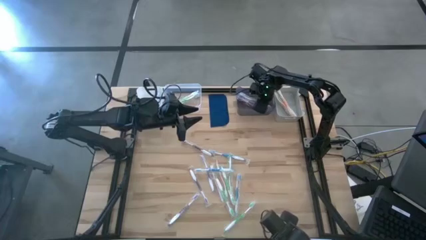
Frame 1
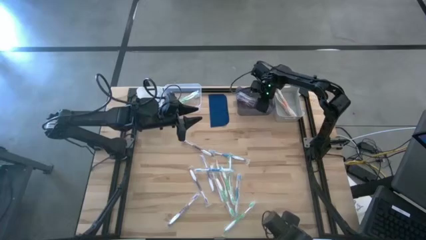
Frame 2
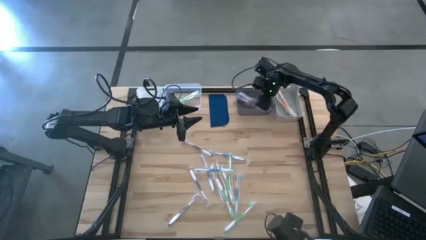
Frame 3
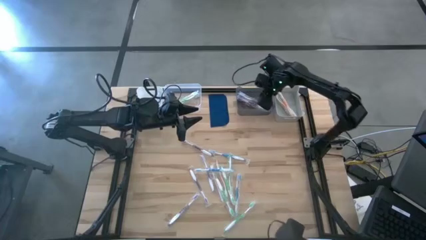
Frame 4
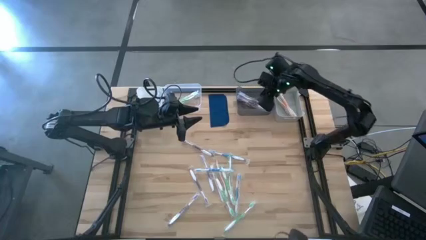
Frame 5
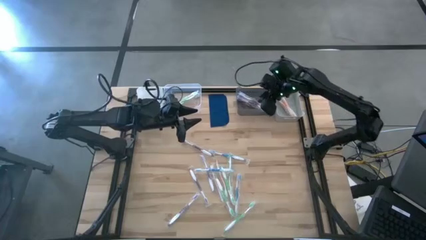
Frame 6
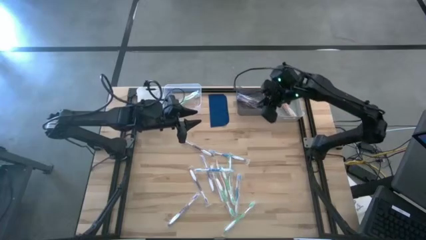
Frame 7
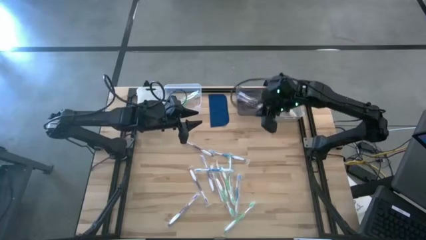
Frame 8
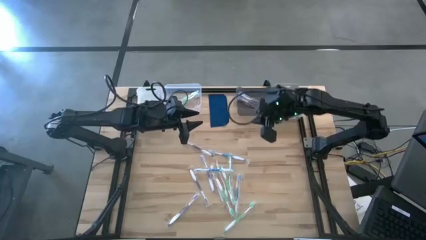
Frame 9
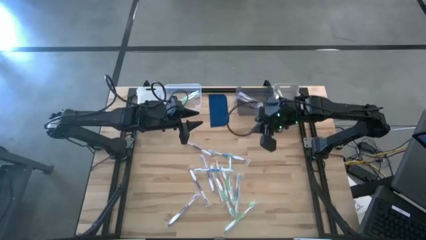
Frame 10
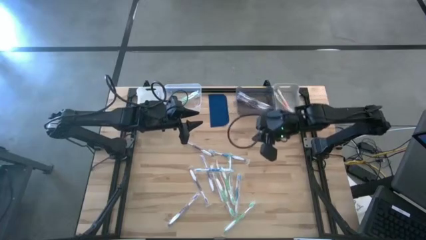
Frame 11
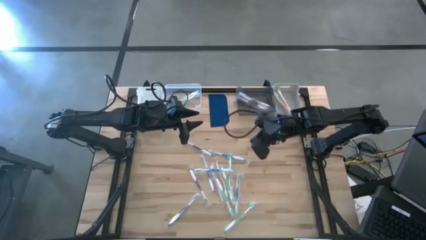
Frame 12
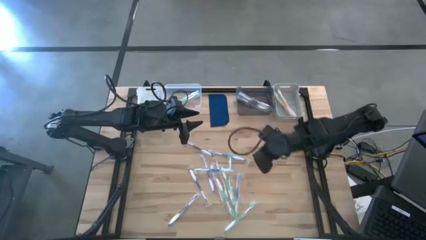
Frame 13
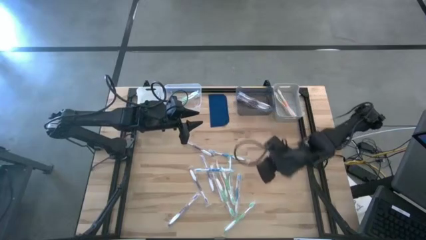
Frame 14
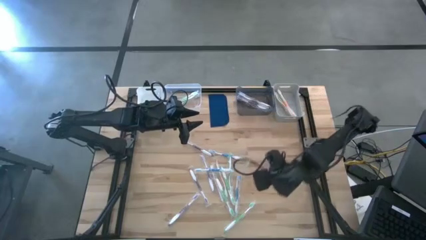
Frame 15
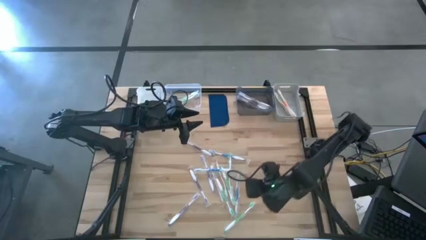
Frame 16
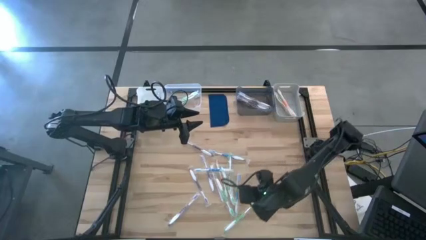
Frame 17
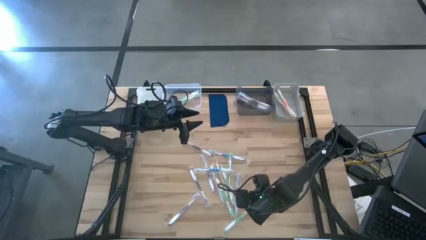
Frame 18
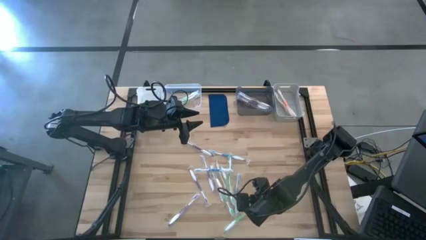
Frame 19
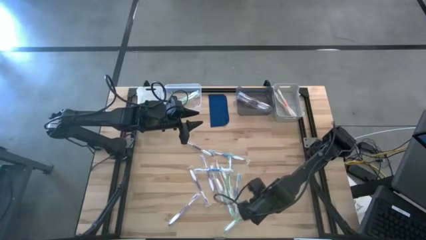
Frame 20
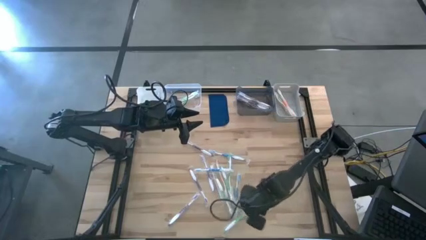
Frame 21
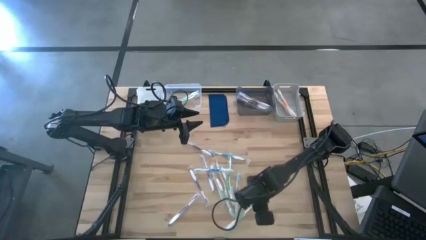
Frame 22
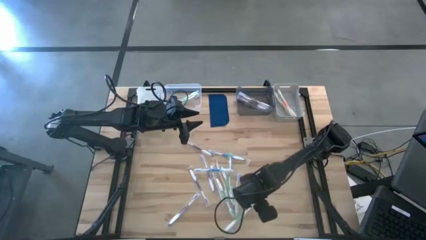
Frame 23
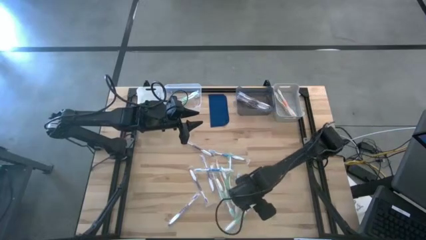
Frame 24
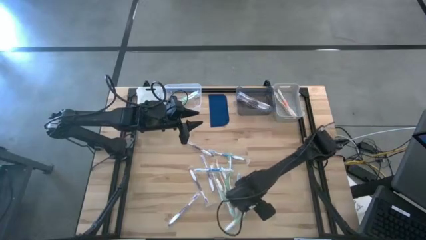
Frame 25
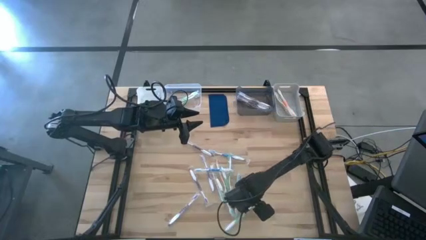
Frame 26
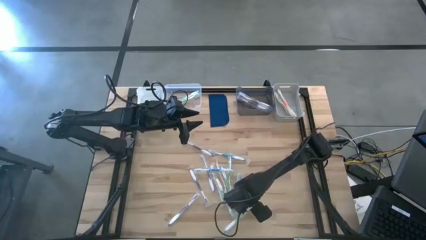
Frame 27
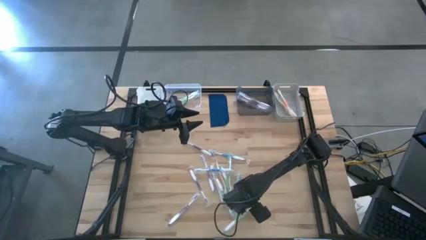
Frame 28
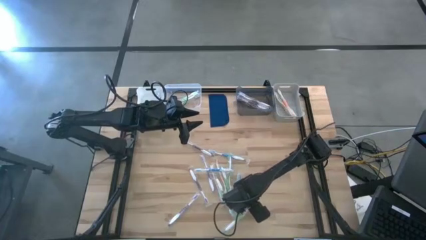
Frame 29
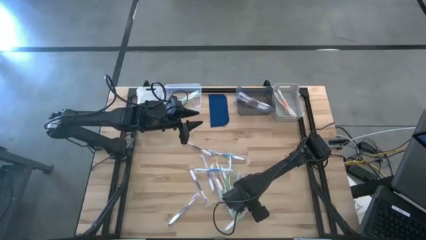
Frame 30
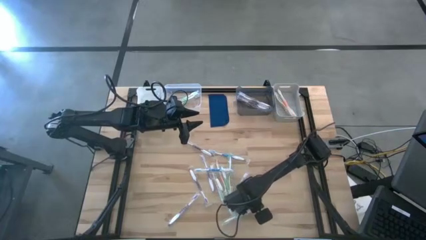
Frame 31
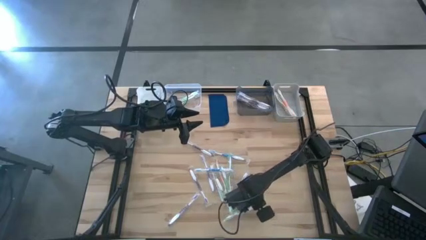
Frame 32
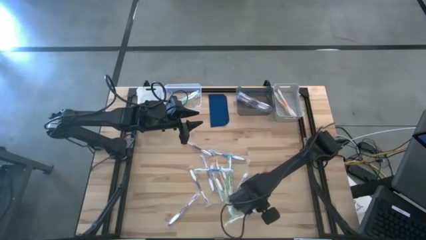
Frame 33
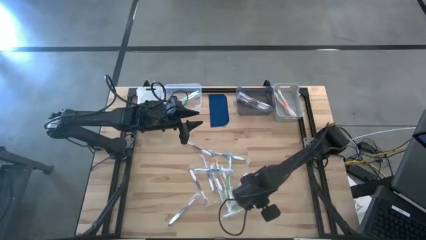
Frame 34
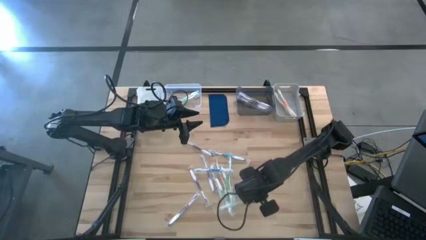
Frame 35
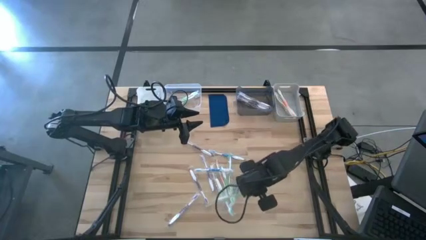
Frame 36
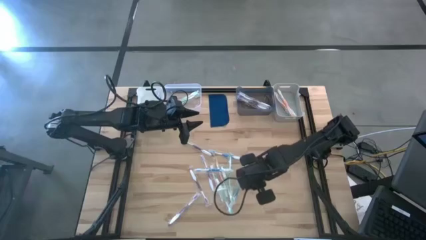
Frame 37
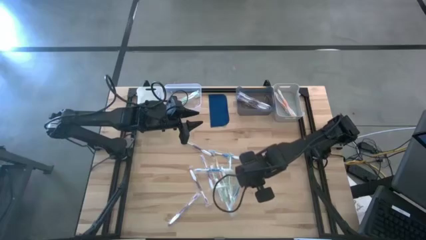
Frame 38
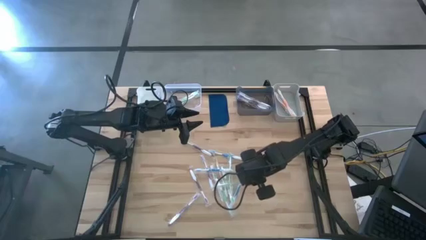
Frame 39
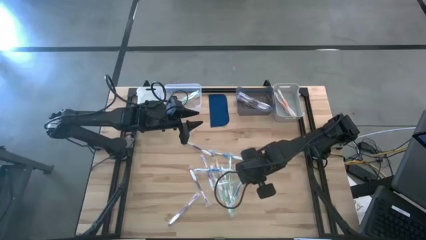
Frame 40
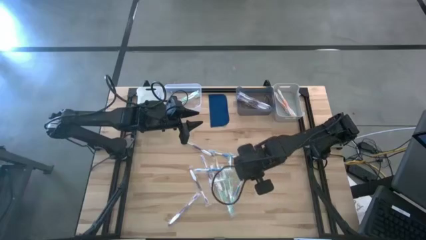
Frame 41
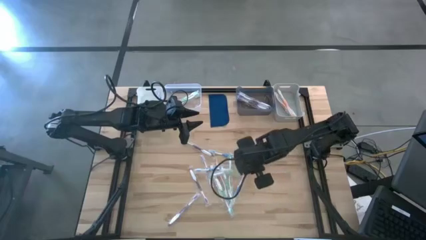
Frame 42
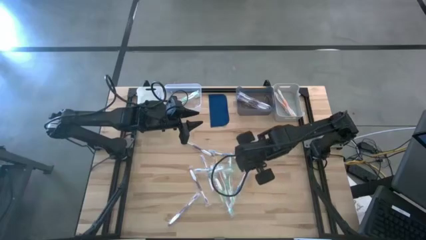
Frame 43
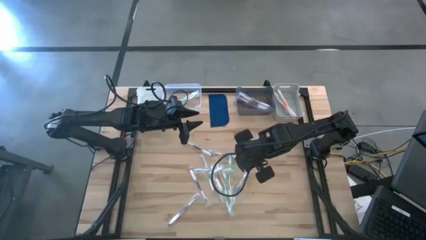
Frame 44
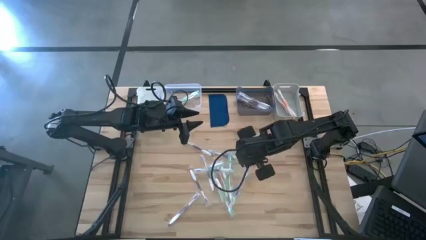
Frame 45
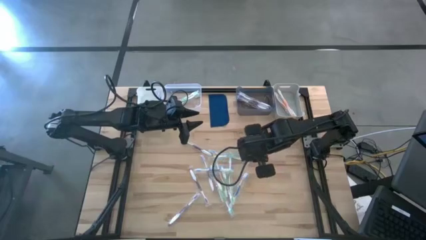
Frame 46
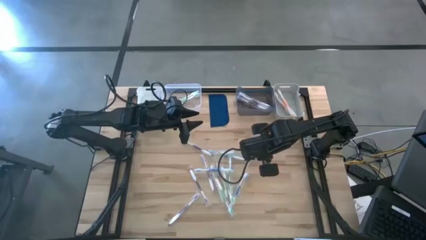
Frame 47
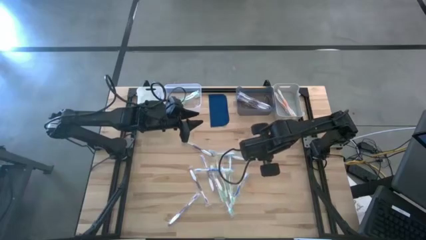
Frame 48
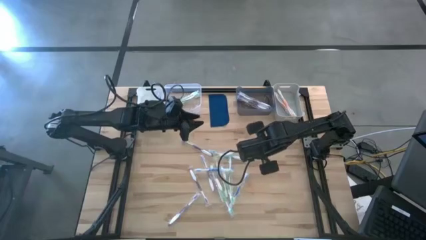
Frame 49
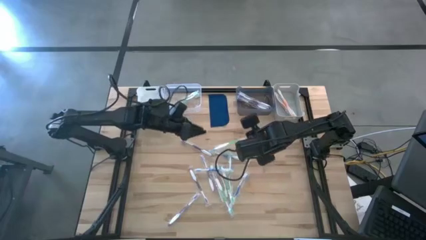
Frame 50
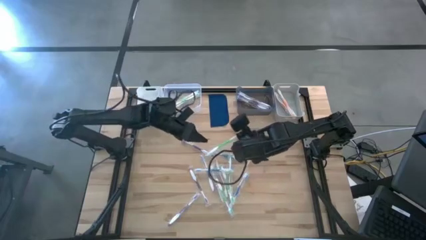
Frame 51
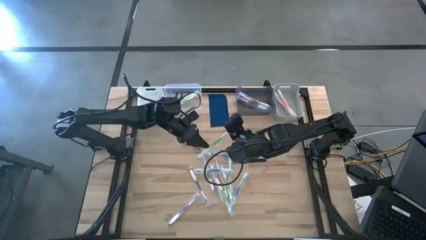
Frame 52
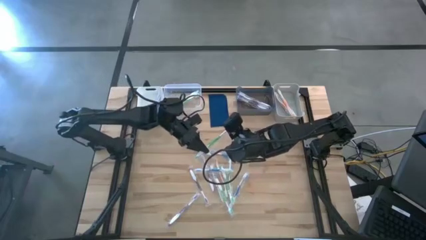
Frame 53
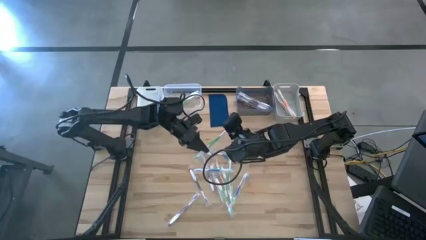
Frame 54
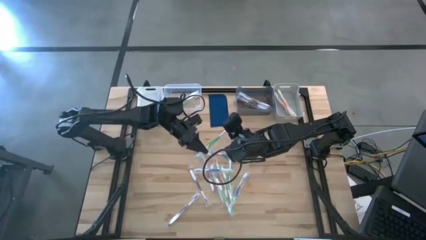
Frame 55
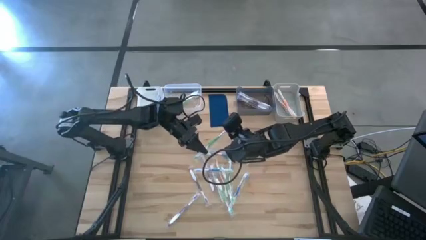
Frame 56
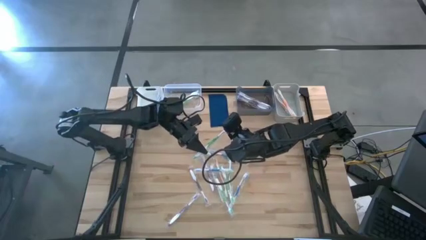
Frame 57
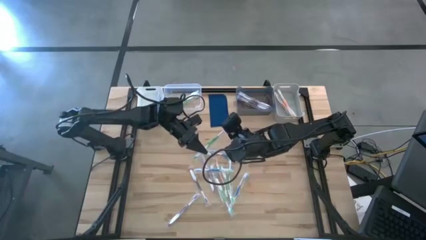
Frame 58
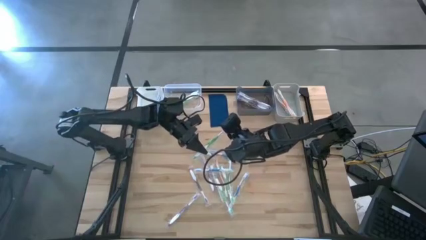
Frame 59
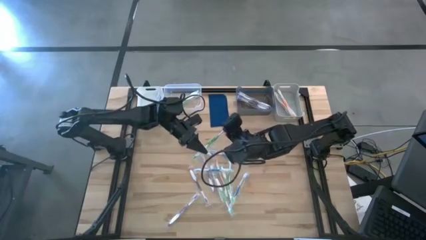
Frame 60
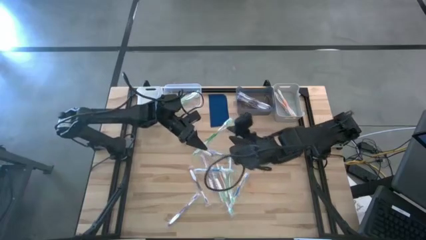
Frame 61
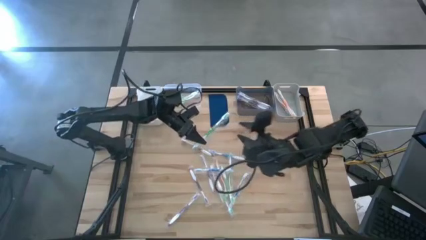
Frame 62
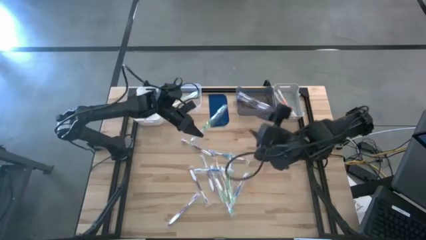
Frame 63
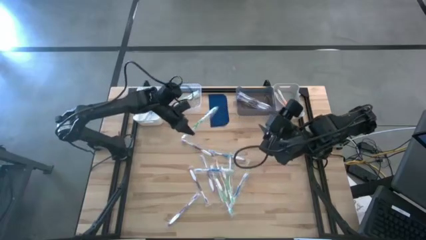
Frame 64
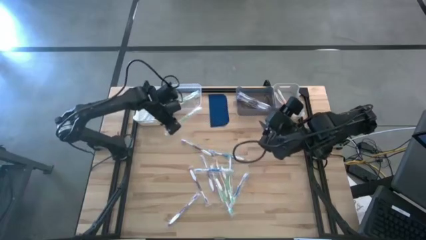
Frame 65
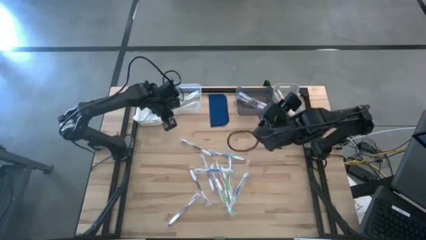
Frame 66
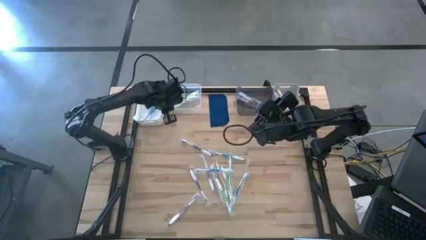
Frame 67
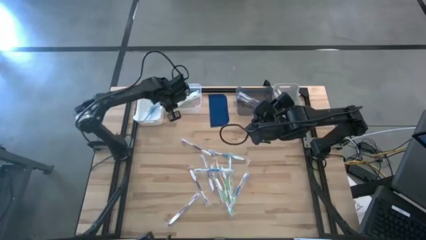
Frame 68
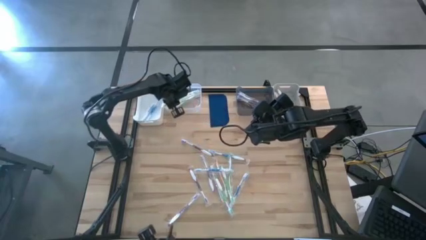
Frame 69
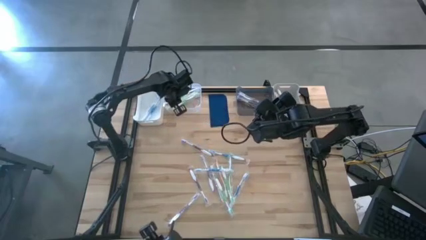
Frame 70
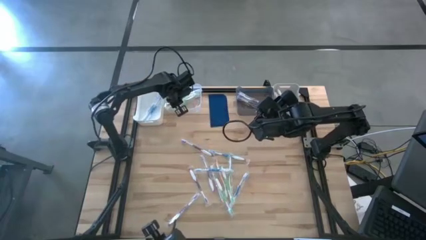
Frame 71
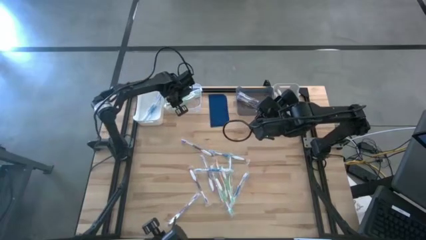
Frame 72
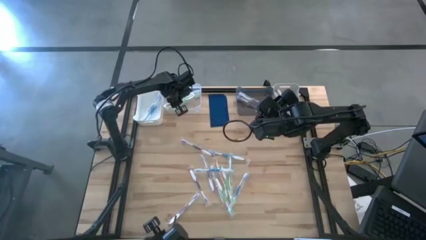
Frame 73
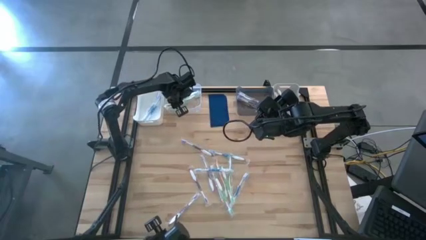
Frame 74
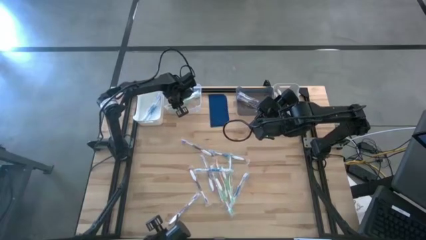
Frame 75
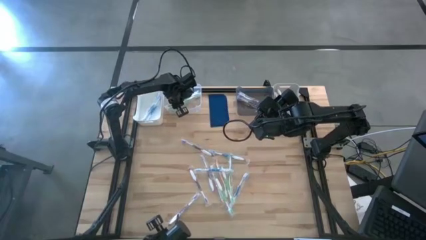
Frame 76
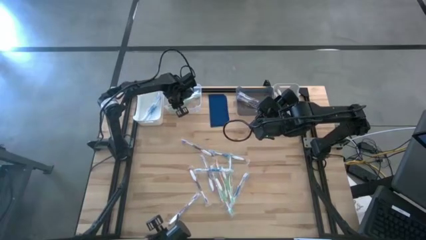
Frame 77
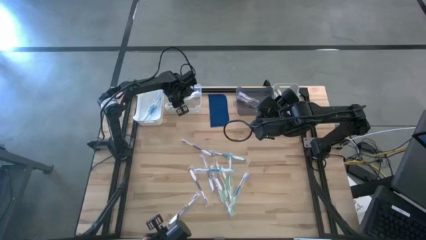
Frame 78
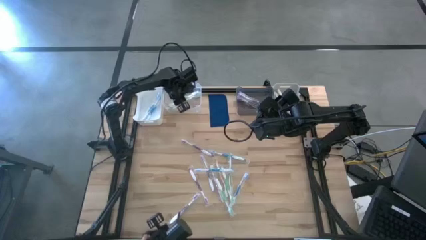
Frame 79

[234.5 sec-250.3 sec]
Task: Pick & Place Toothbrushes
Put the green toothbrush into the transparent bin

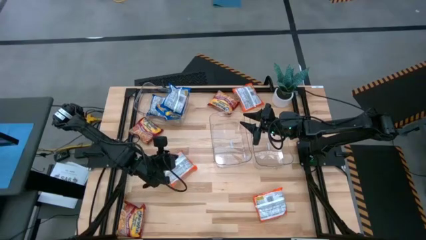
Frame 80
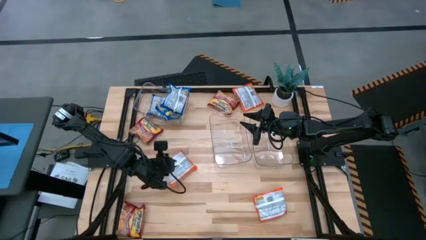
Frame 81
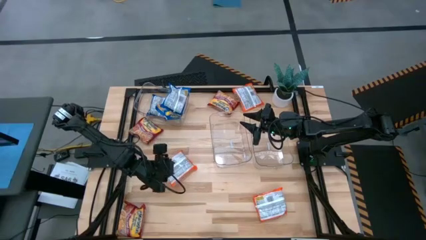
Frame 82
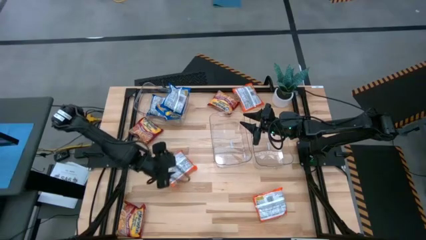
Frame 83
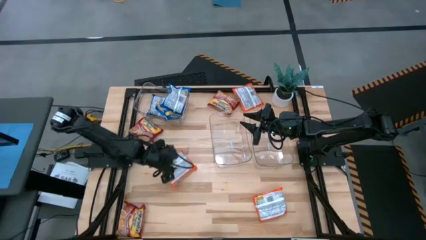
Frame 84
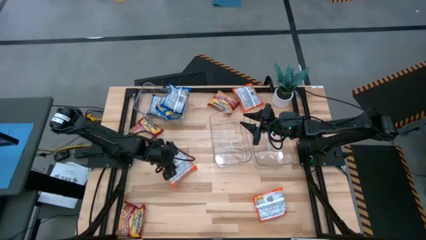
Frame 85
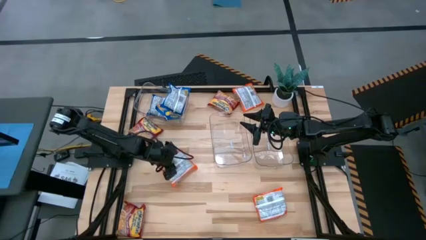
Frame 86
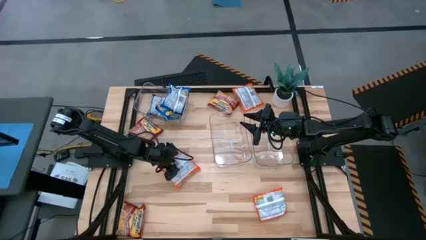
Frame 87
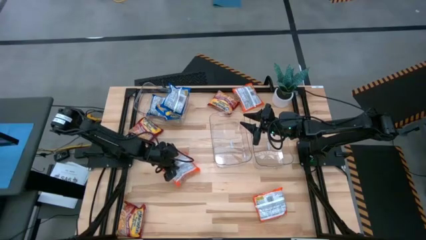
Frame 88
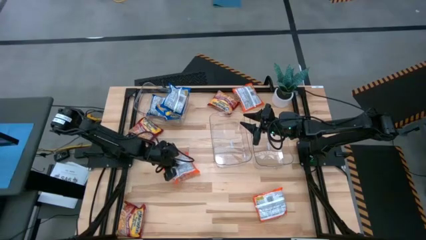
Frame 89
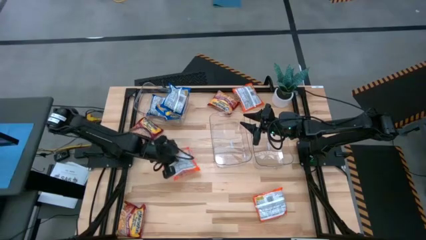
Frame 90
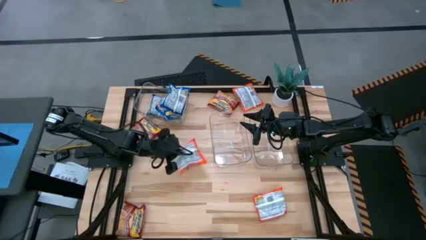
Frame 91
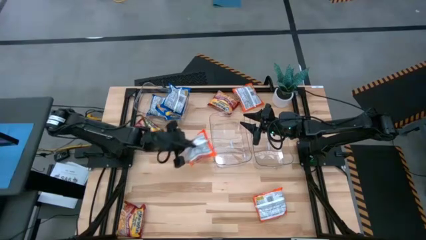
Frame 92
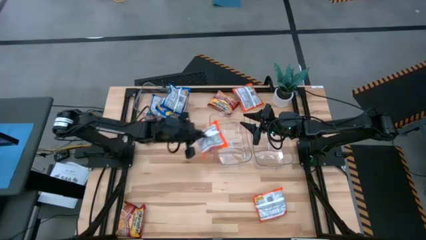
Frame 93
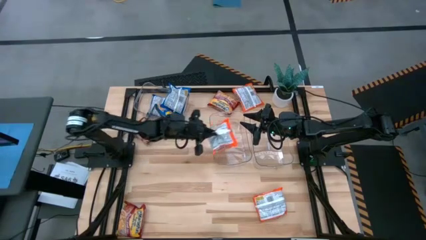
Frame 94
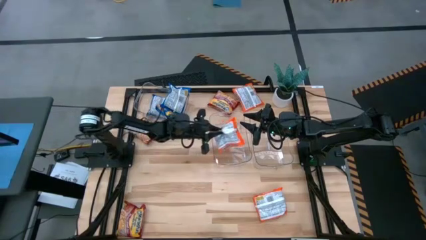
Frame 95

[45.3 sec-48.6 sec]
Task: Sort Maruchan noodles
Put the bottom left orange noodle pack into the bottom center transparent bin
